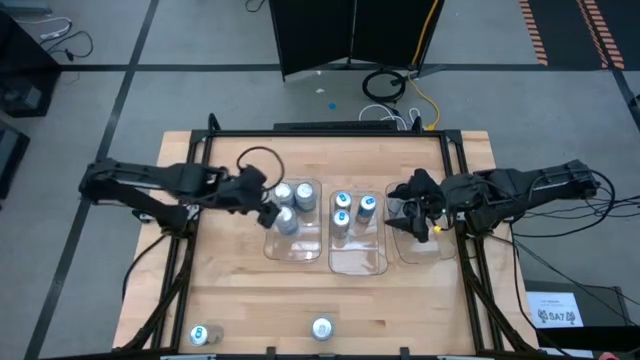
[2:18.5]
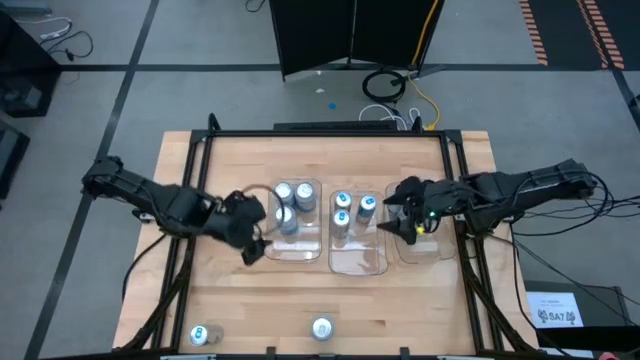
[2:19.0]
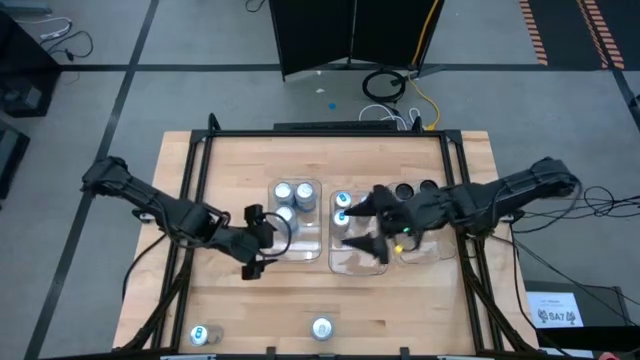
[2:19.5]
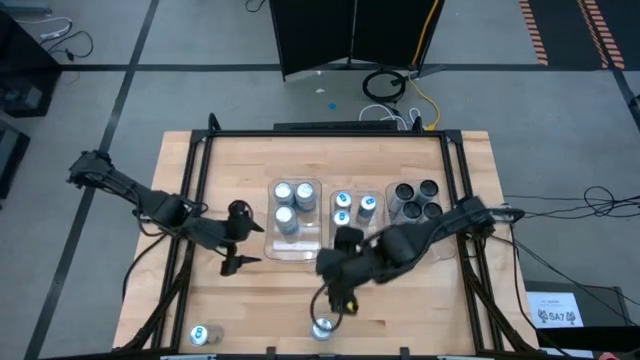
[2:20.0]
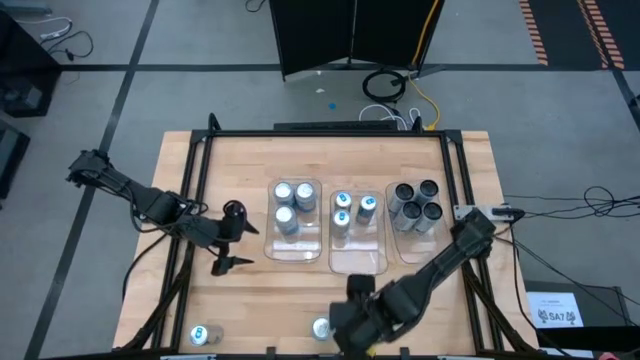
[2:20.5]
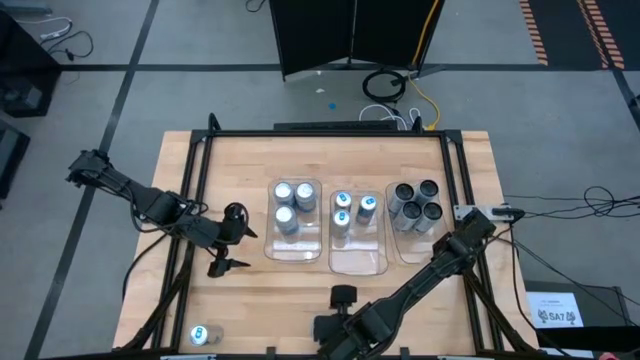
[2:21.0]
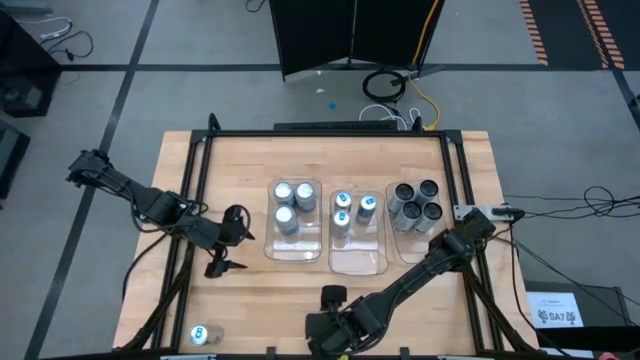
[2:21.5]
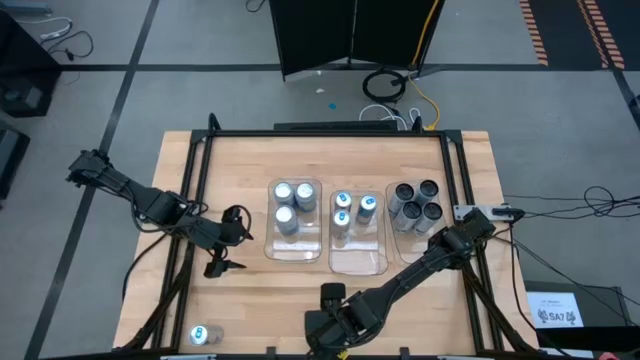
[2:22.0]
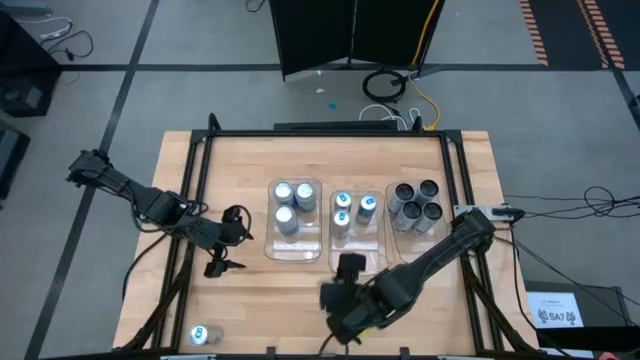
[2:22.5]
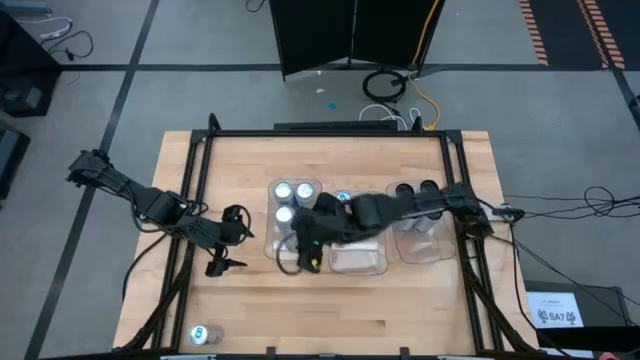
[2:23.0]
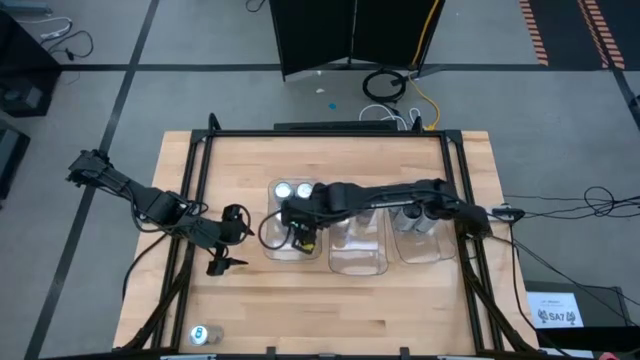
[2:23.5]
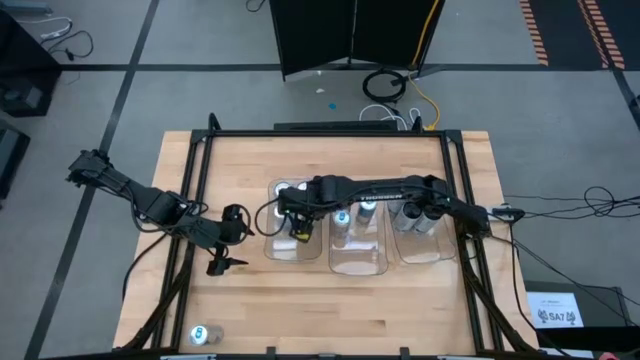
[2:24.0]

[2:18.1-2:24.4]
Task: Sort soda cans
Put the blue-white soda can into the left transparent bin

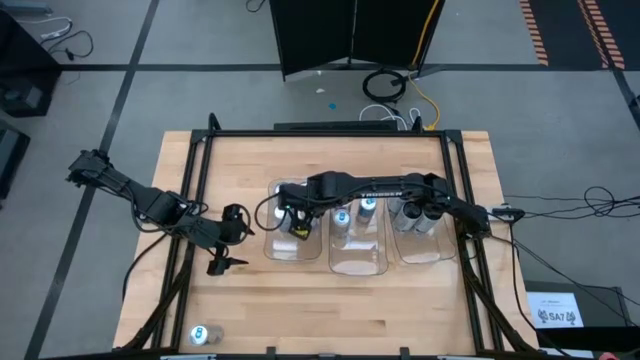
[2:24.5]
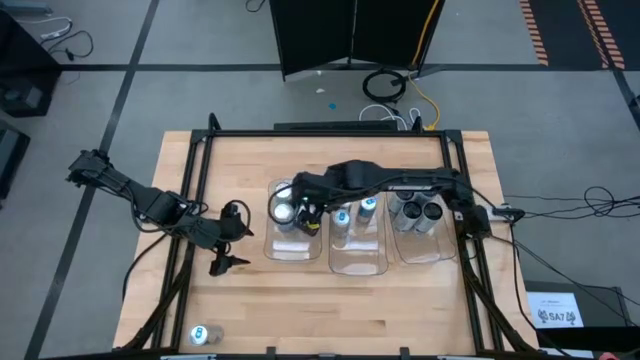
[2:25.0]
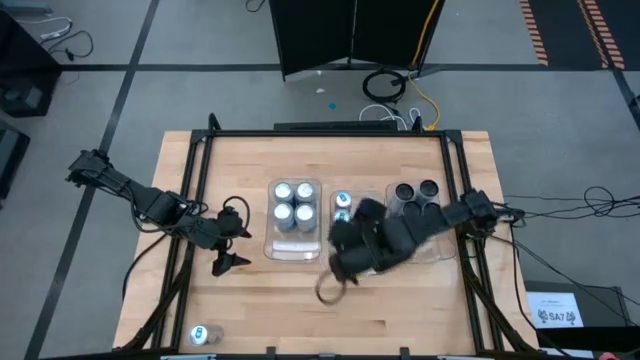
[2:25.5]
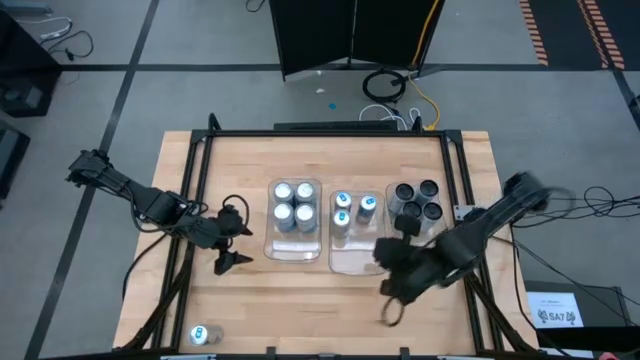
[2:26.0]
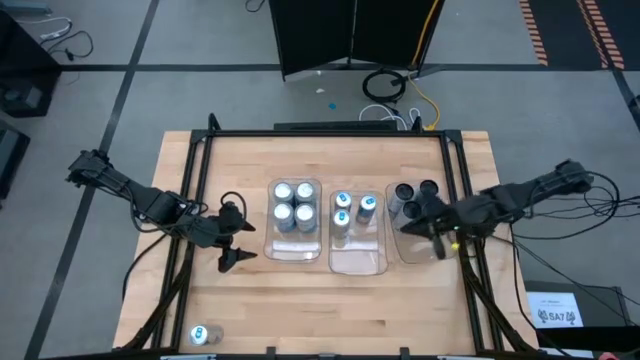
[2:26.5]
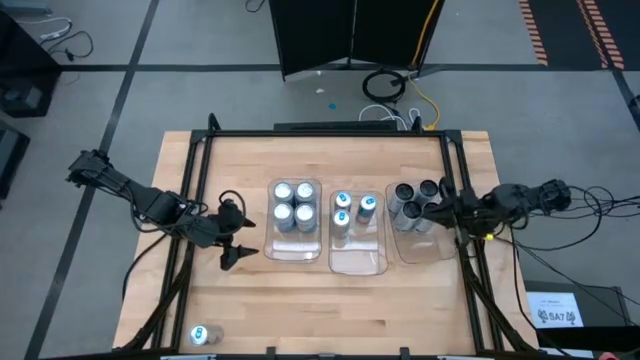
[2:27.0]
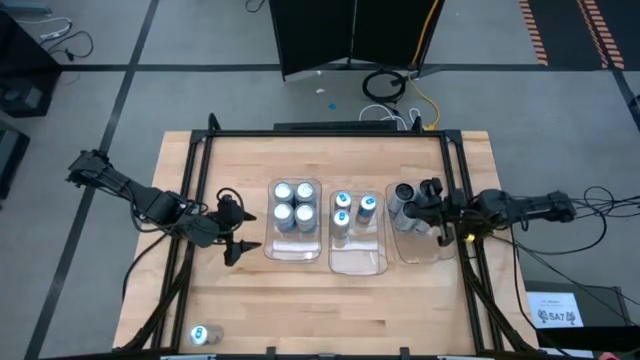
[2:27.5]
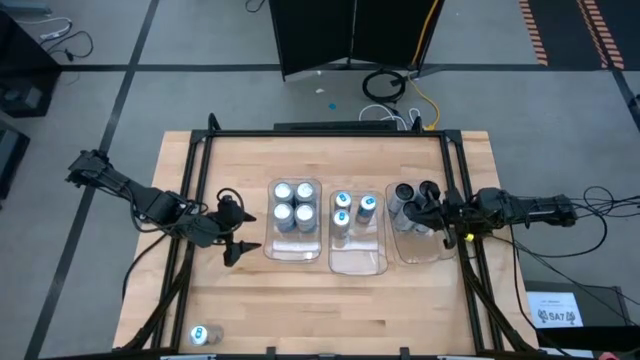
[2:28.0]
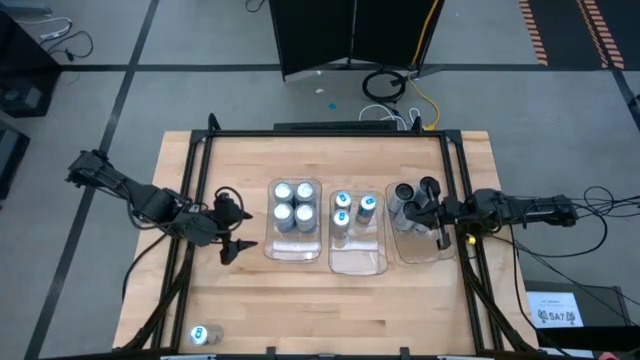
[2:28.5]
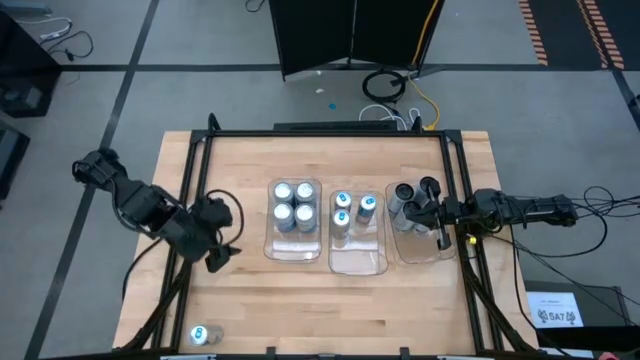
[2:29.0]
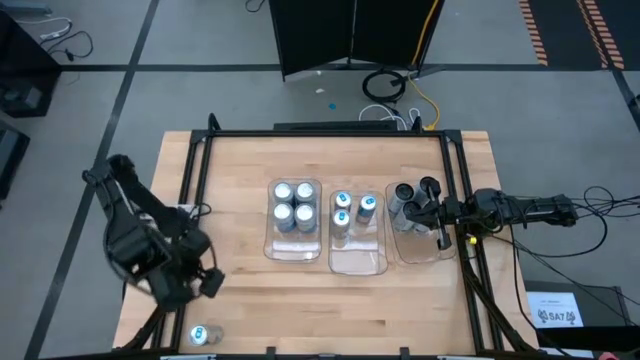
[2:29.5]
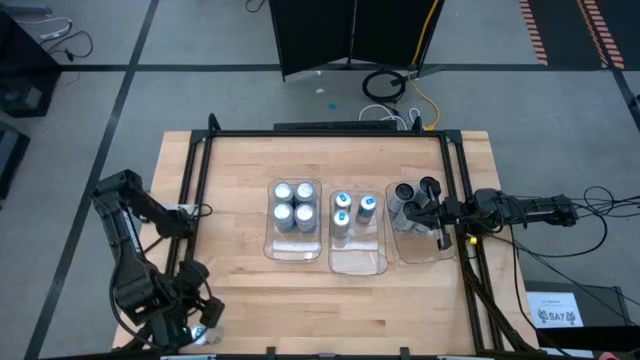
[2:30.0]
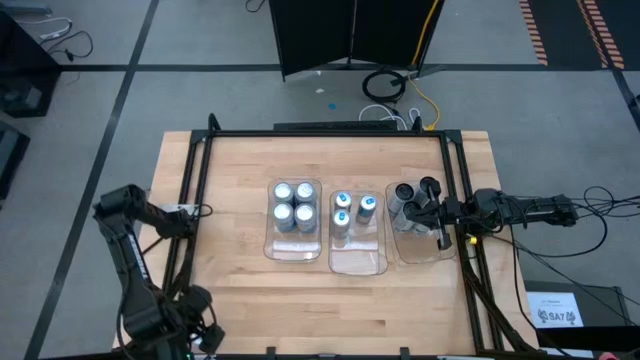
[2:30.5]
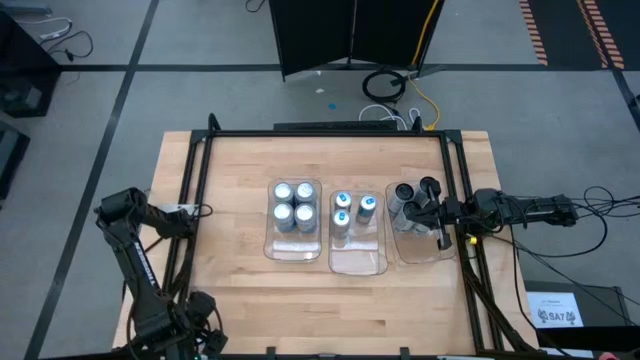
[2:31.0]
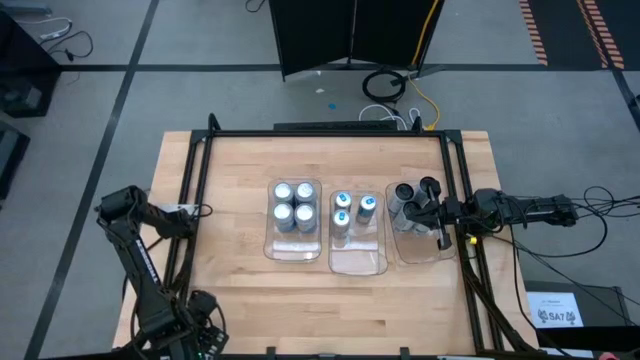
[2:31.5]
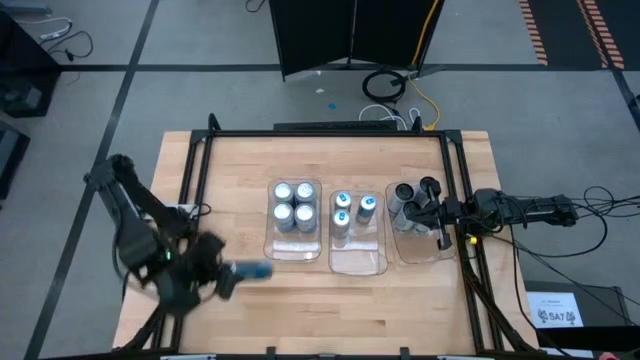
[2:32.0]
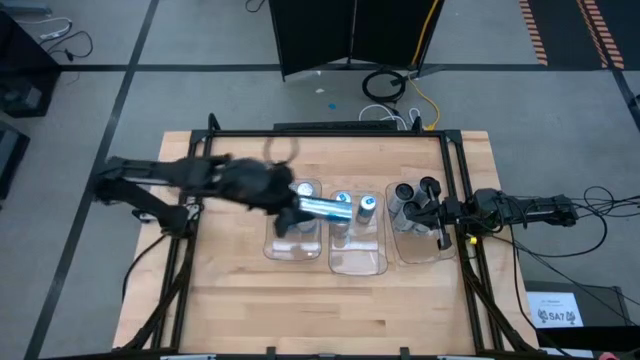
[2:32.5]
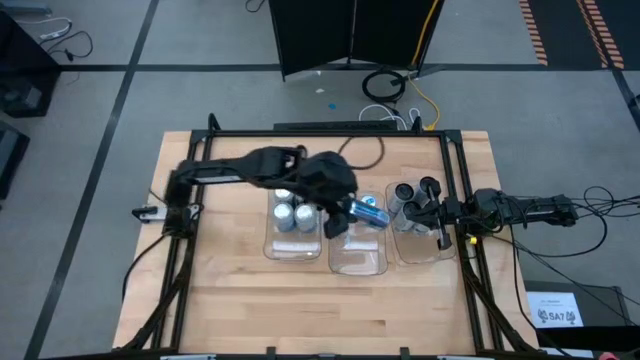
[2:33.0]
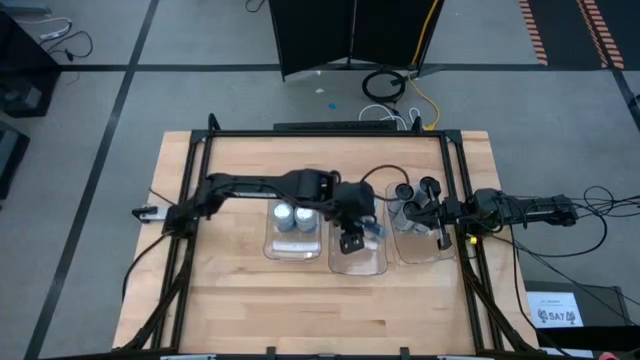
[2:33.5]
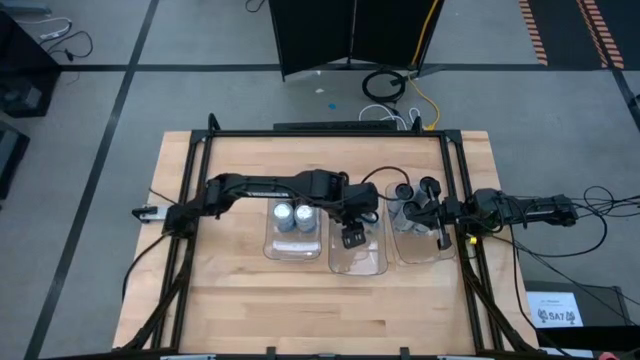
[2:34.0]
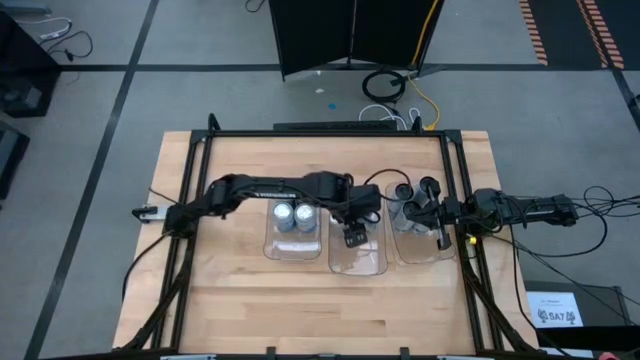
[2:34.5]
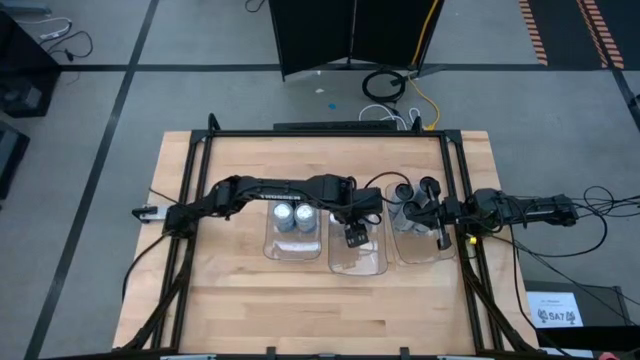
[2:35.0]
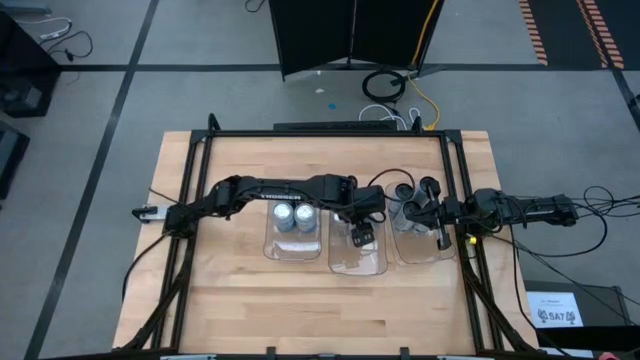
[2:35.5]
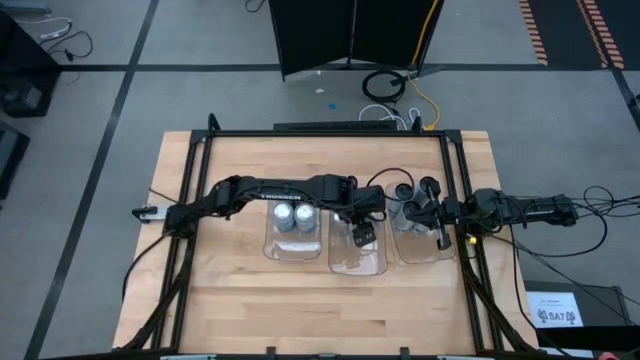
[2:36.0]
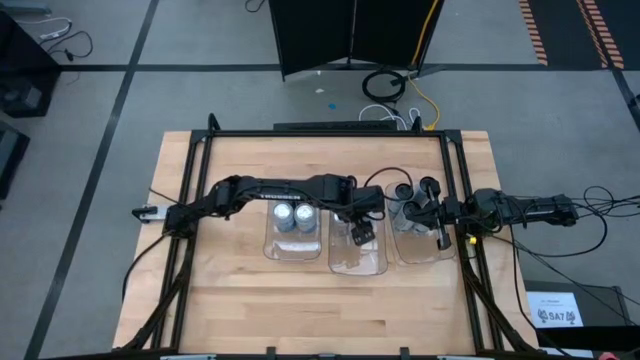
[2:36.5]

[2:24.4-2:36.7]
Put the blue soda can into the middle transparent bin

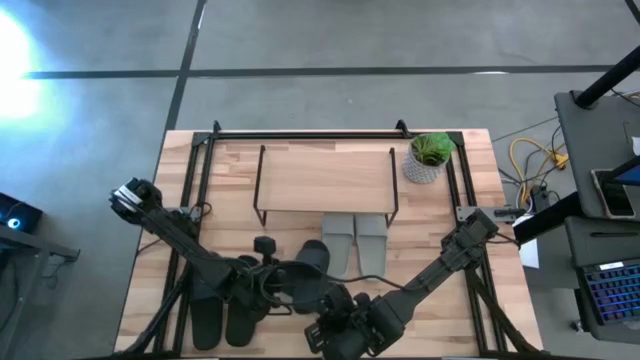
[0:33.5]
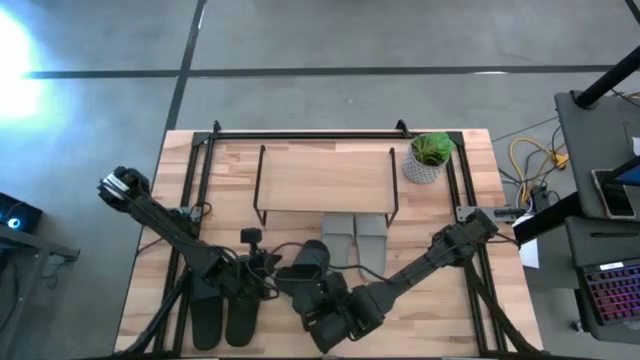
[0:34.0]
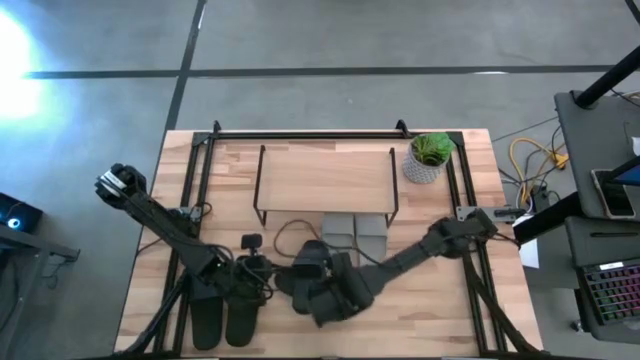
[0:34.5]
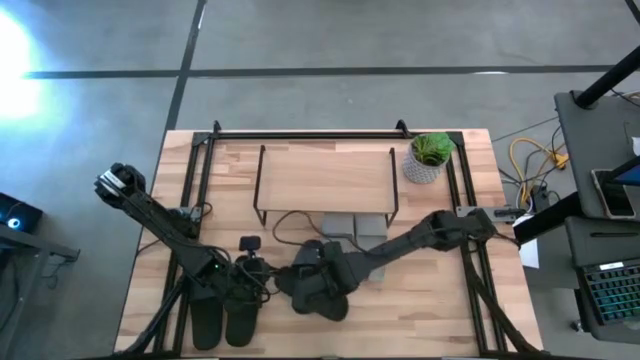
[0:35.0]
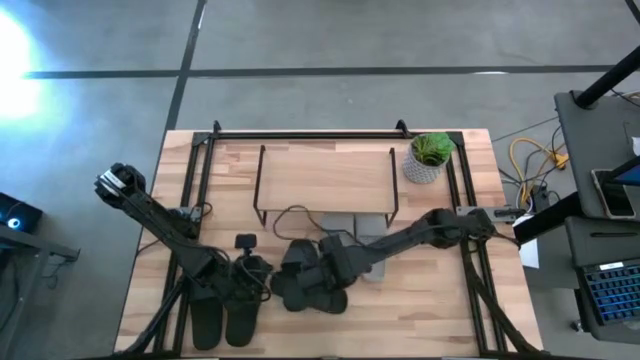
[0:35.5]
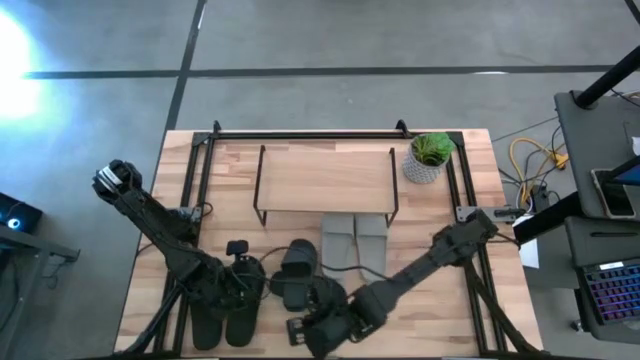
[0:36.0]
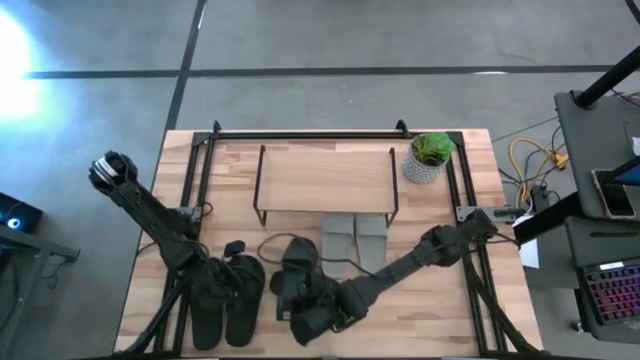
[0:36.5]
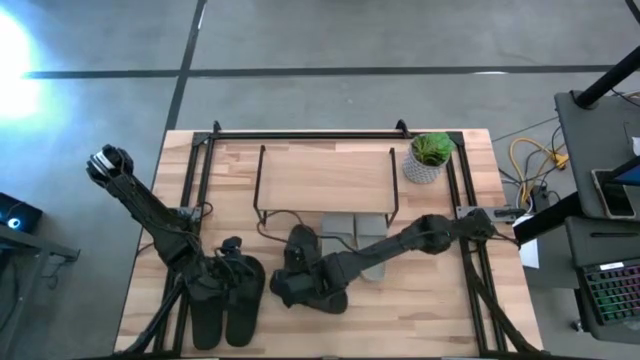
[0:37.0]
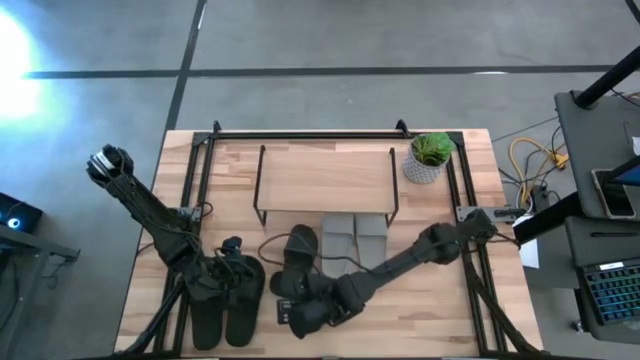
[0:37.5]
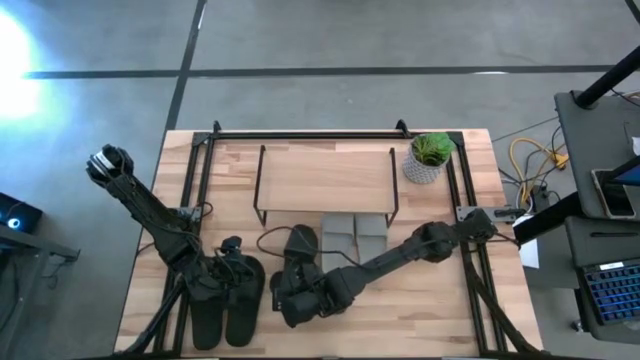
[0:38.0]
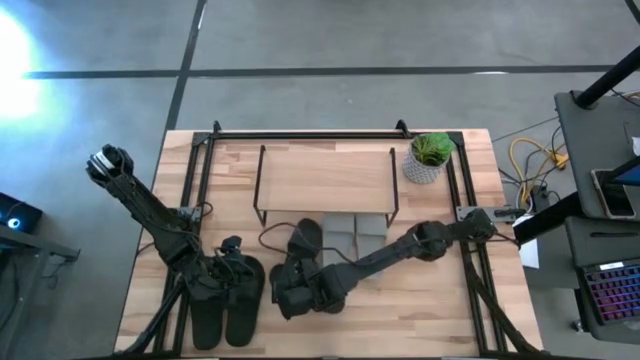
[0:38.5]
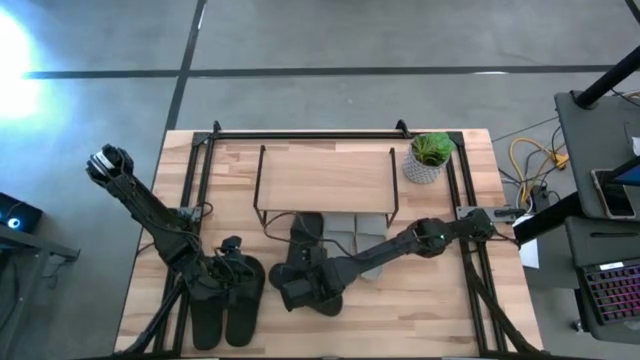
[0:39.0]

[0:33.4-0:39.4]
Task: Pick and place slides into the shelf
Put the black slide under the shelf
